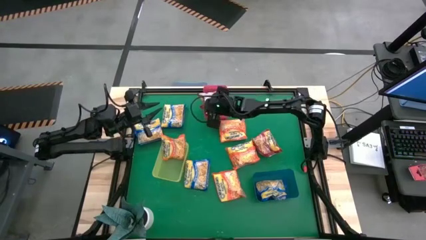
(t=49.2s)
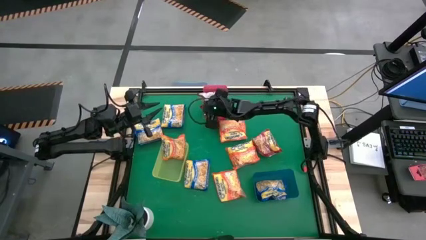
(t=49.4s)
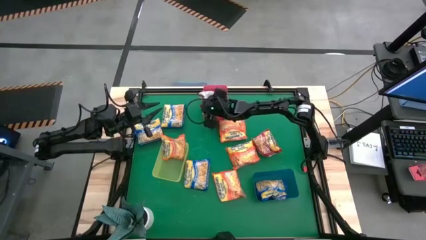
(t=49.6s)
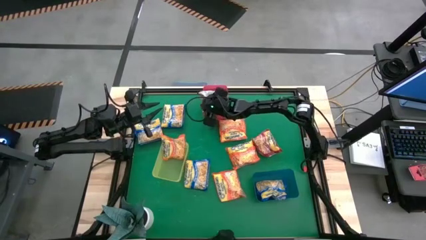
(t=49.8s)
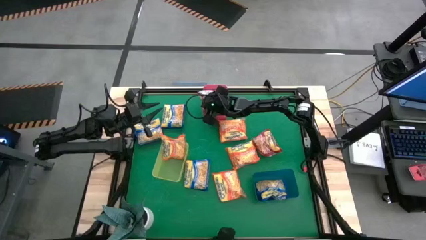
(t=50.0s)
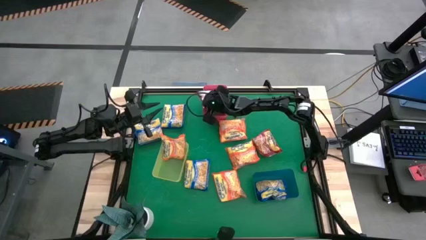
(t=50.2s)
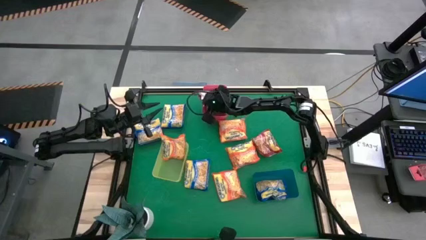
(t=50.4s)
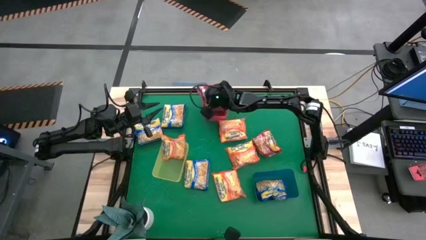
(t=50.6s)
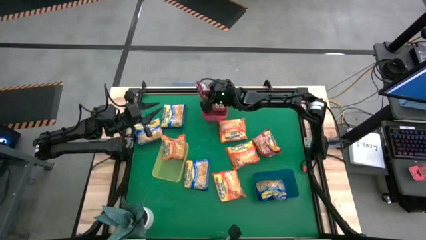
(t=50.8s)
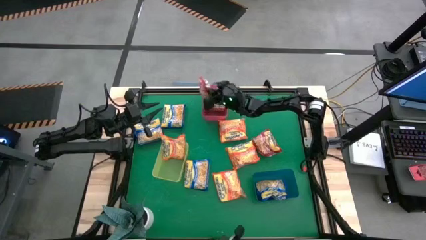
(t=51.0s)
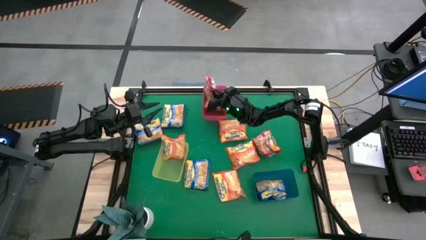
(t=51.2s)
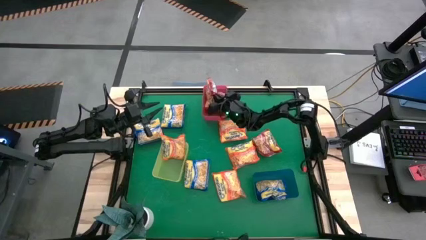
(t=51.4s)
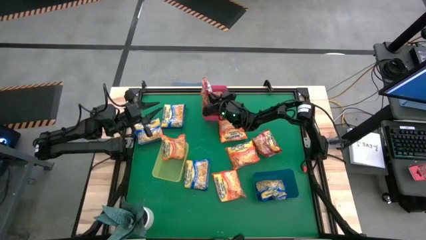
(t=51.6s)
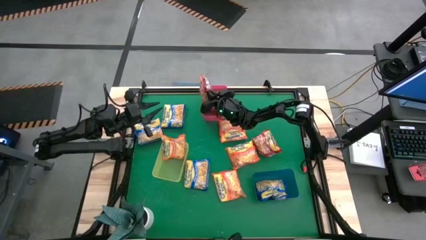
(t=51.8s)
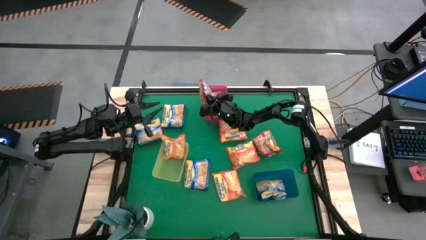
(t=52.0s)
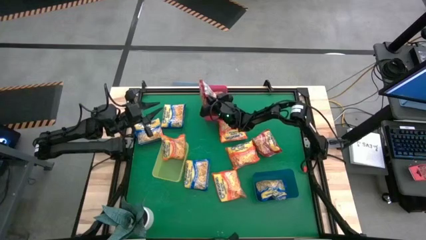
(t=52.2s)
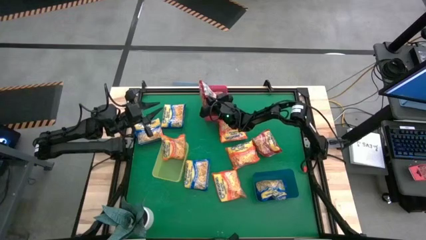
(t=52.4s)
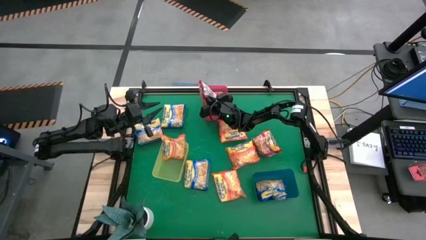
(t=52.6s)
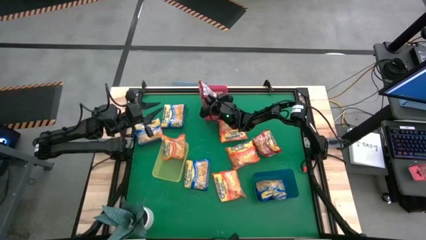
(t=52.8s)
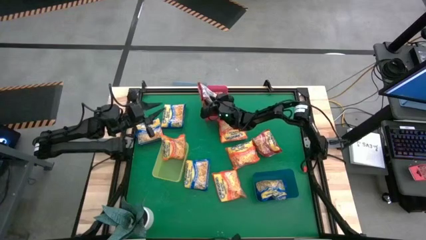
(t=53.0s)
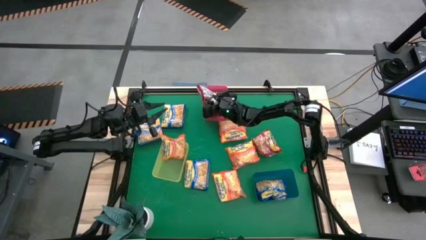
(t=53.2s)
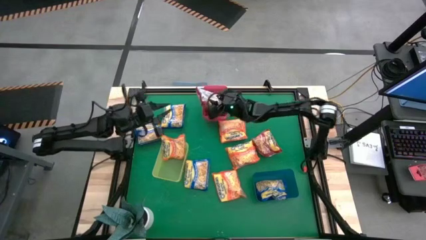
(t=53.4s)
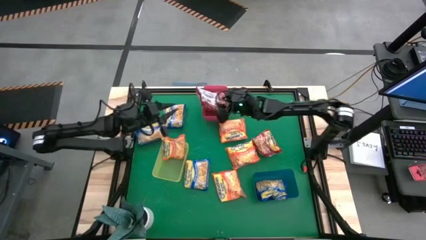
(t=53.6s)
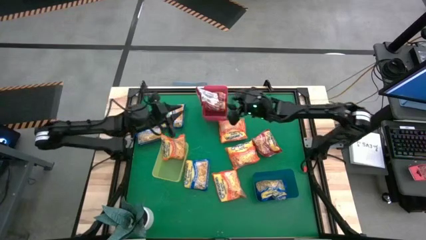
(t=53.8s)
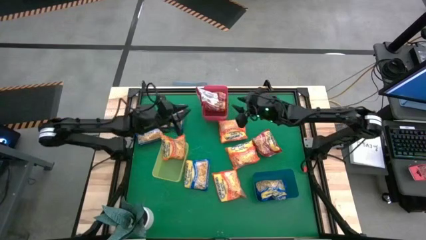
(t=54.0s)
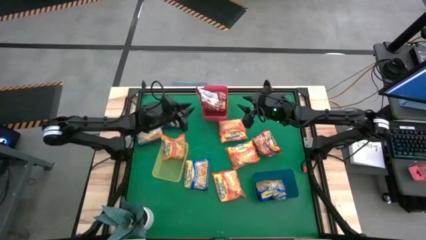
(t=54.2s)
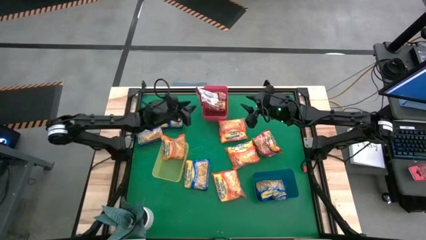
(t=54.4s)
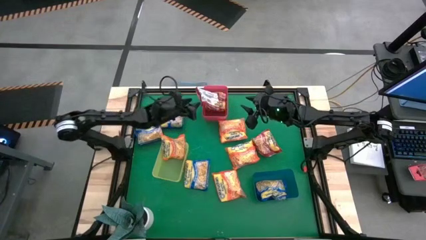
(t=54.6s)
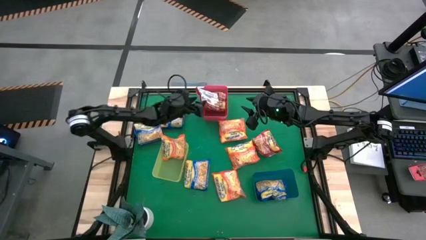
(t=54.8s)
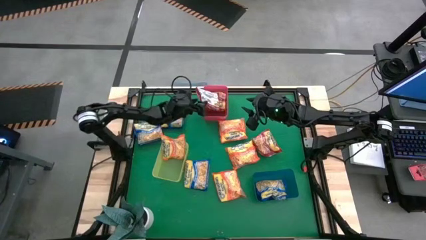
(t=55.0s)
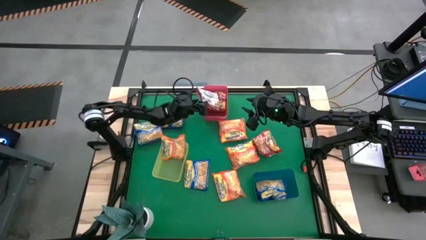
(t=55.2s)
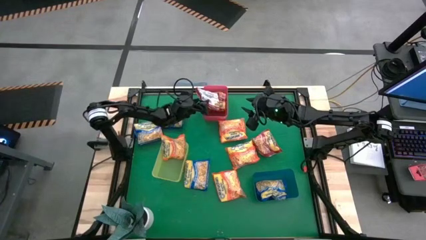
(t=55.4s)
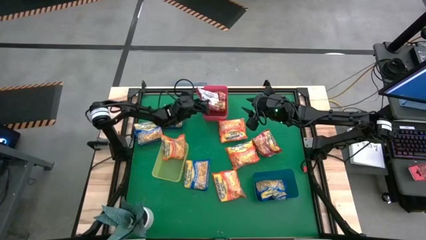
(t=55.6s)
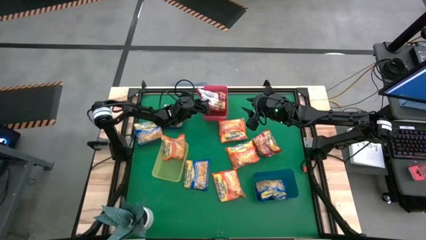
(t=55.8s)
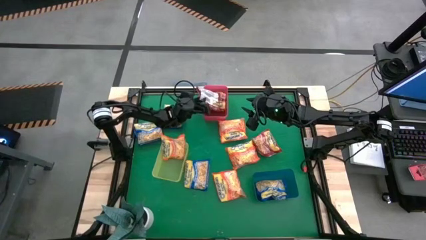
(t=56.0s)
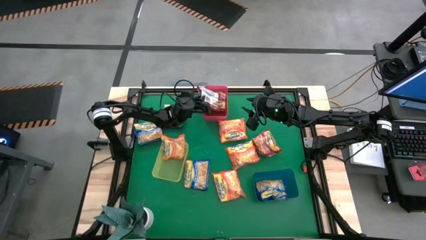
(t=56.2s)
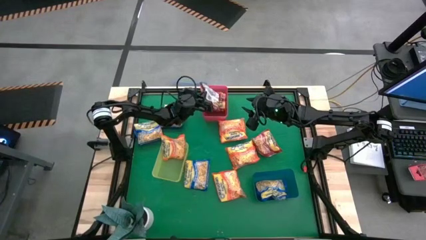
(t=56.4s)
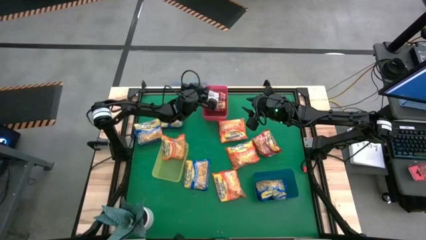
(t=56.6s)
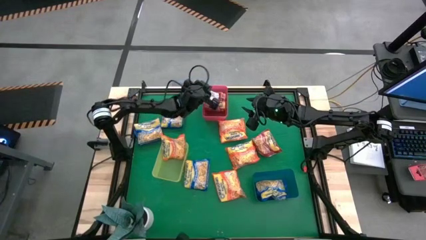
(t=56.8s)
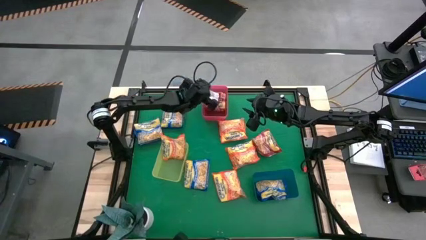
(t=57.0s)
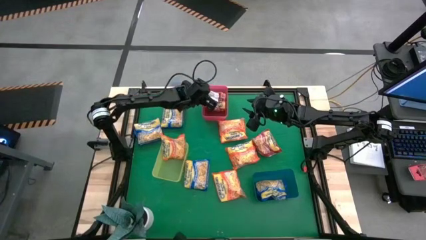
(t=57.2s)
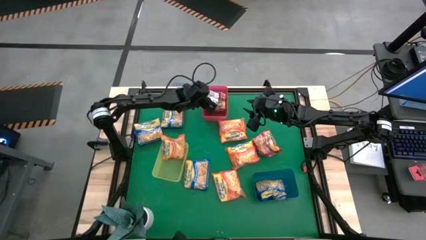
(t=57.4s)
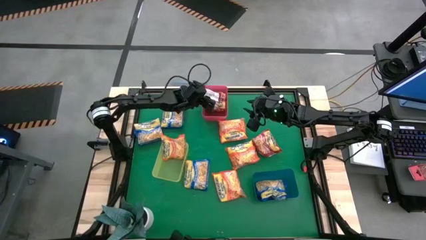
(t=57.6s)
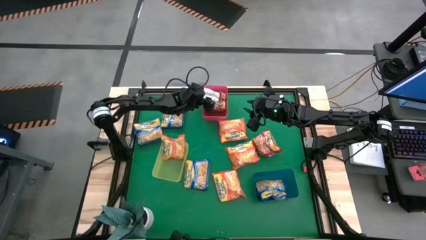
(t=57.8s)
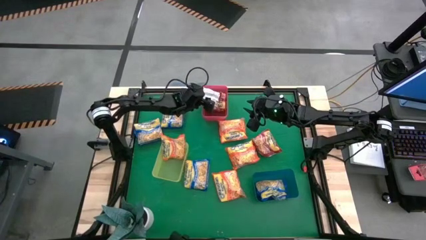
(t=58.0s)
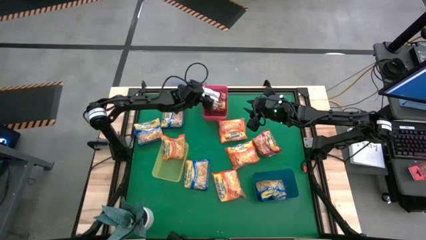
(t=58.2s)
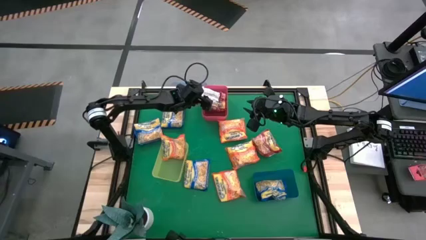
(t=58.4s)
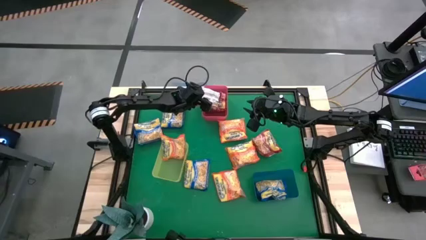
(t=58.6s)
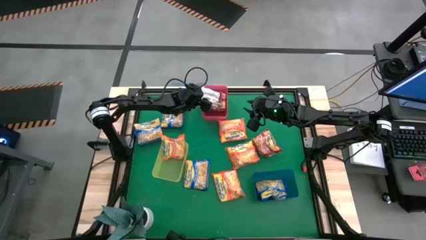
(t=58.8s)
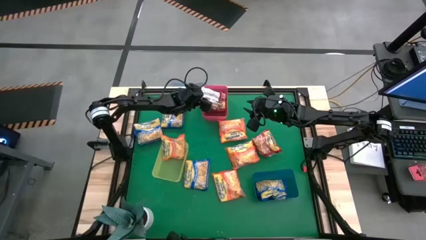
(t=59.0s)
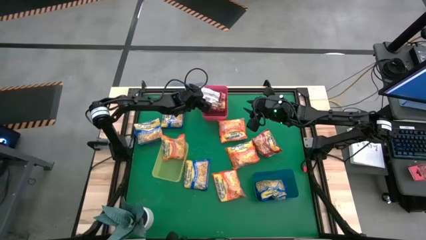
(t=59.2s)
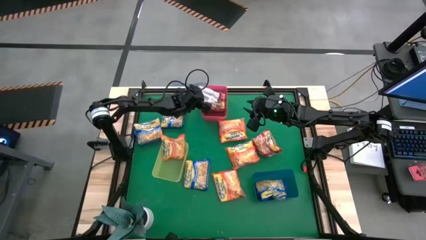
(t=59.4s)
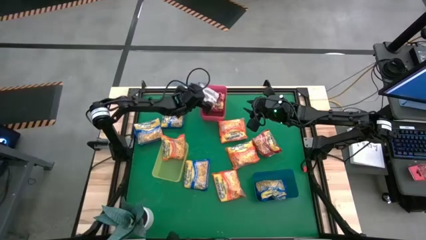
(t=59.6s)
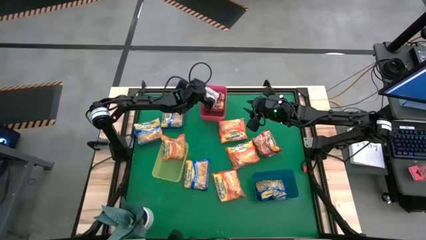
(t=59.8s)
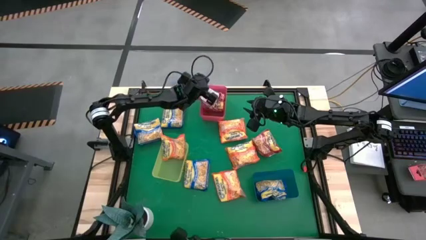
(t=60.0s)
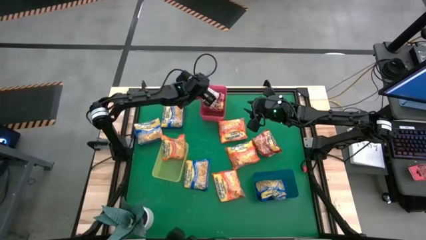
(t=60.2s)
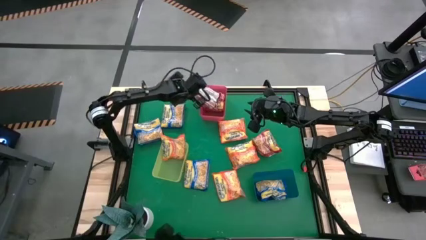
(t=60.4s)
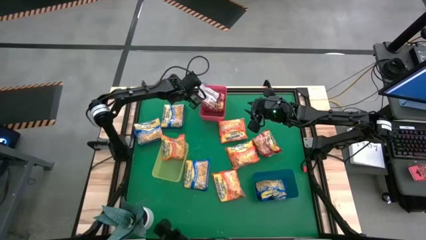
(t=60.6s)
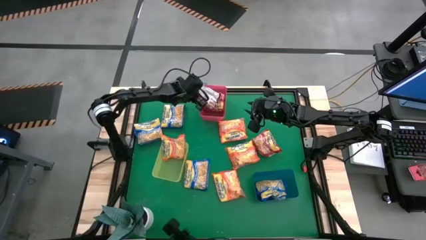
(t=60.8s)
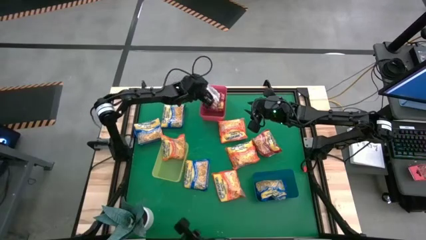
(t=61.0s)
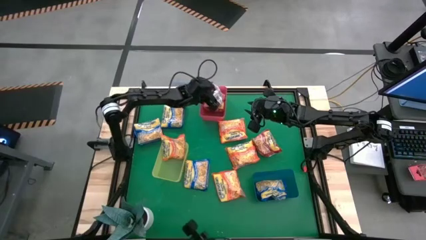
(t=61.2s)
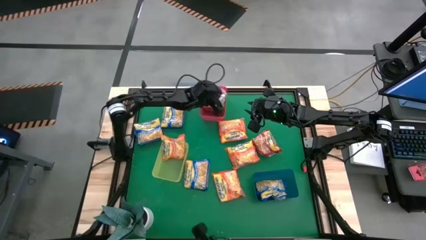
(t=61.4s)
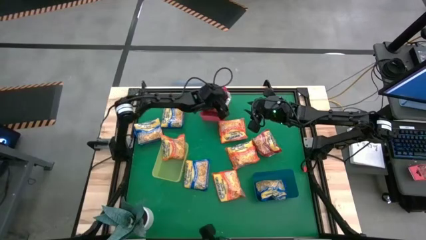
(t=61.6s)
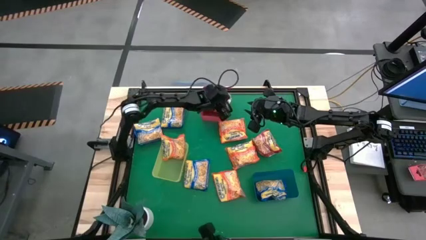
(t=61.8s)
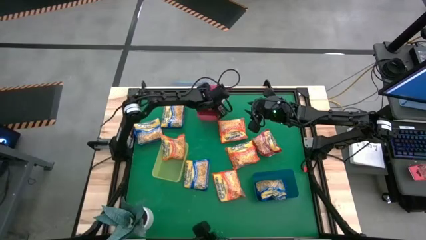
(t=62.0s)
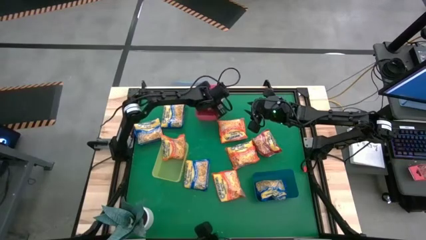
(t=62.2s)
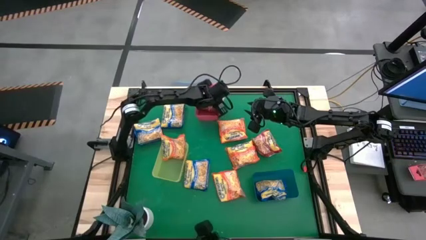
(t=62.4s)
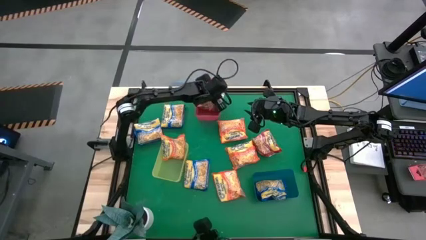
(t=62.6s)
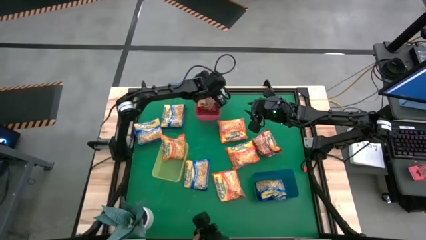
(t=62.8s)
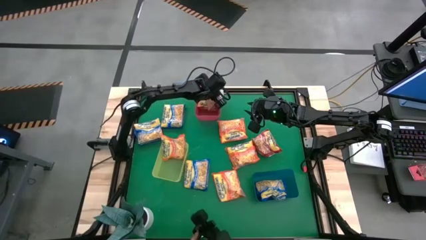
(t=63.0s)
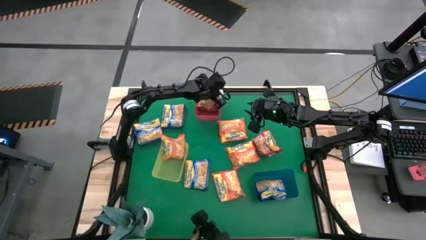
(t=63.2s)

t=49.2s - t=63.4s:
Task: Sort Maruchan noodles
Put the noodle pack into the red bin

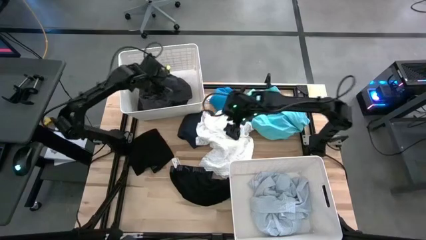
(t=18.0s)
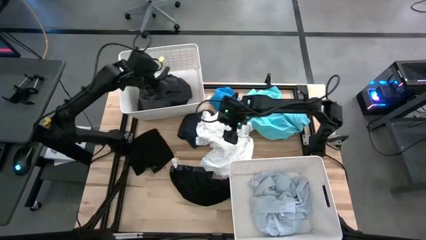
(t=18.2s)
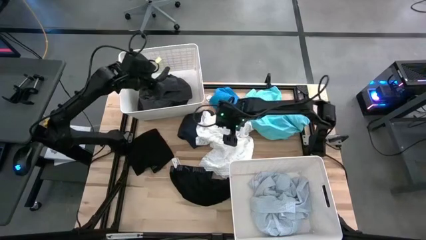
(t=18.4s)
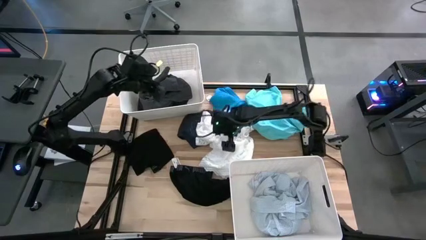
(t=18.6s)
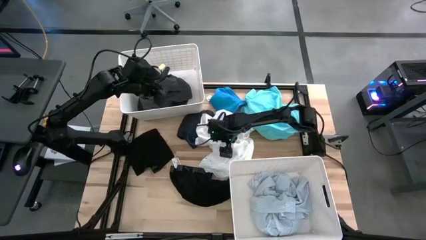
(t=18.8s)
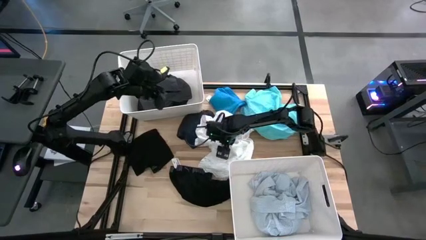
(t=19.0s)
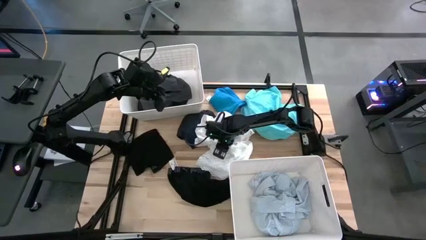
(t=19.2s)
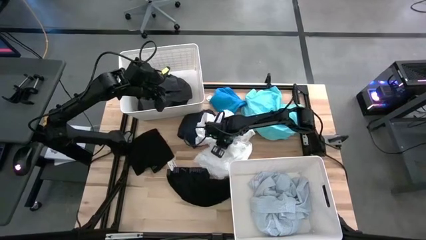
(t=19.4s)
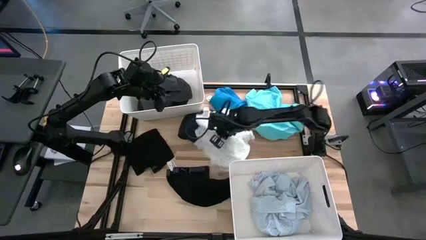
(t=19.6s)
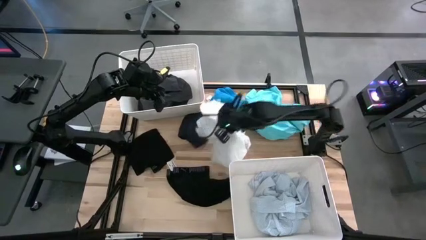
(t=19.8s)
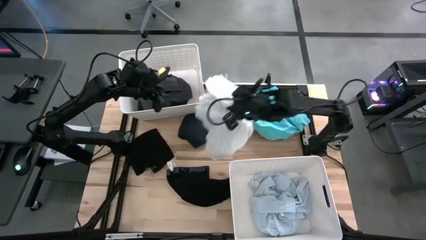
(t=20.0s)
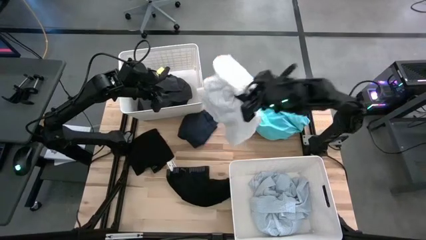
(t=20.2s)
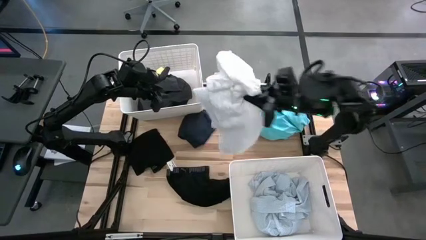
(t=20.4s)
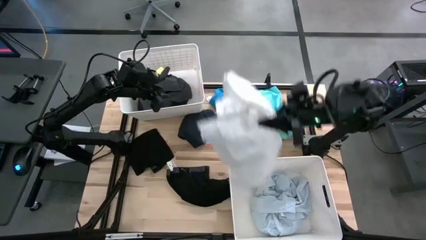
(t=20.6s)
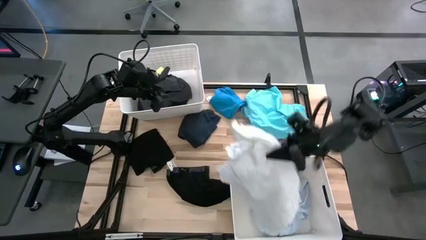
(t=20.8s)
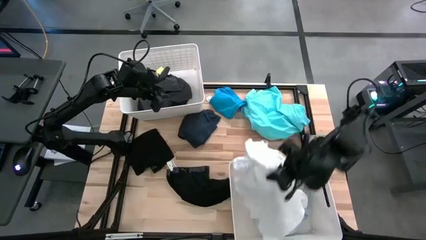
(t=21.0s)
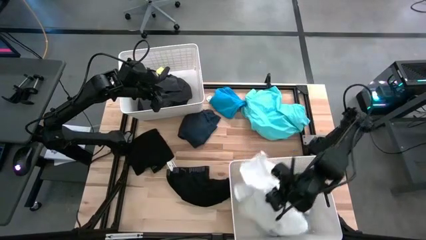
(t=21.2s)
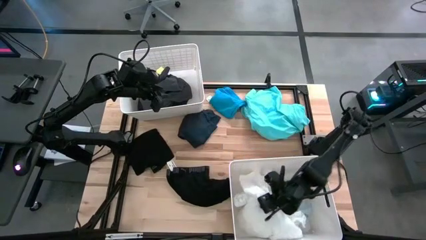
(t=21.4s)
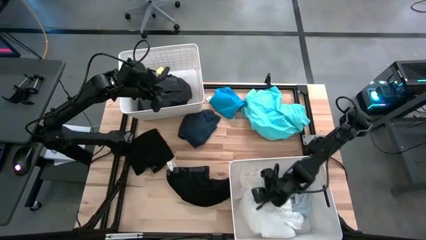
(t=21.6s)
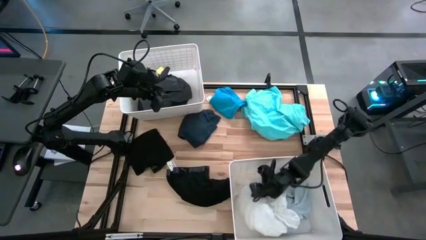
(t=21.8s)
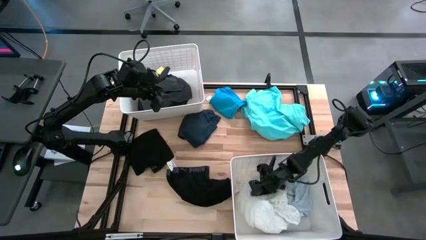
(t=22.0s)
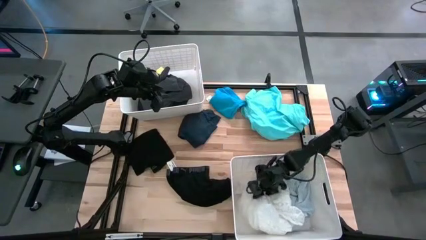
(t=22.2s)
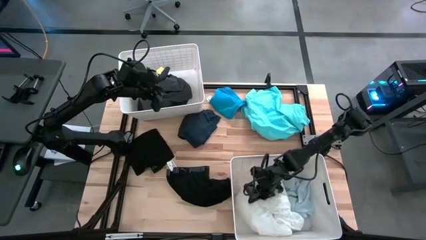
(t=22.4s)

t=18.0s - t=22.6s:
Task: Sort clothes
Put the white dress into the bottom white bin
